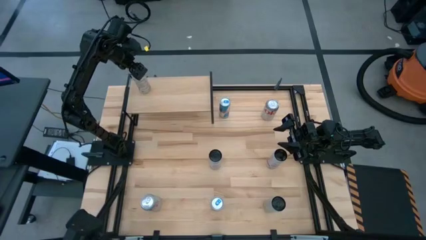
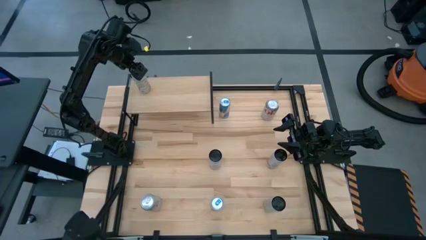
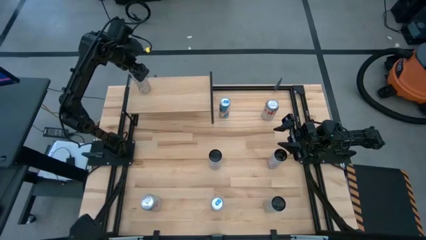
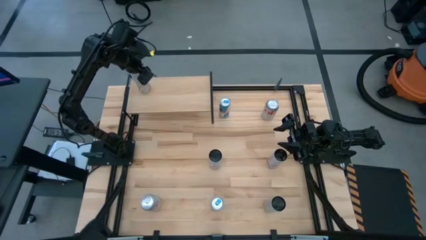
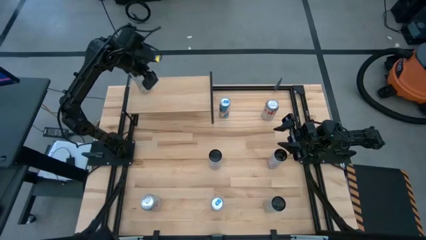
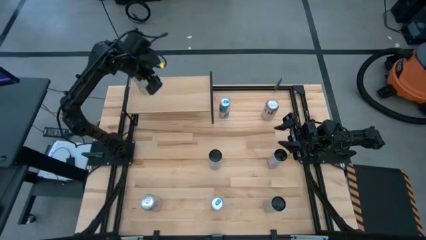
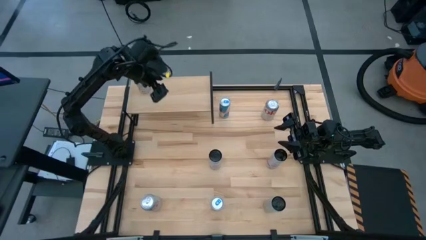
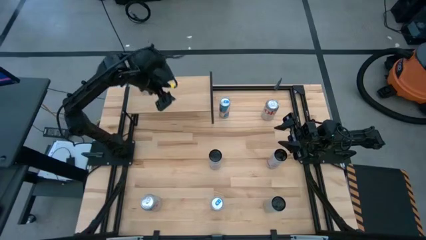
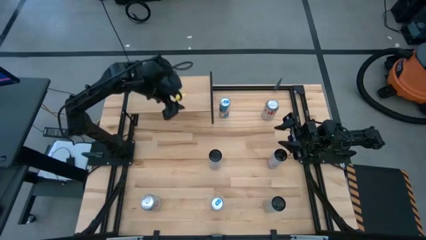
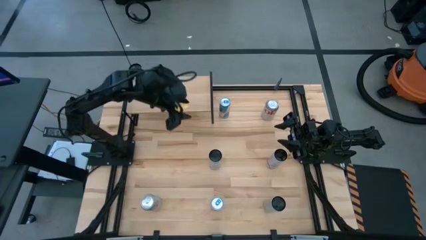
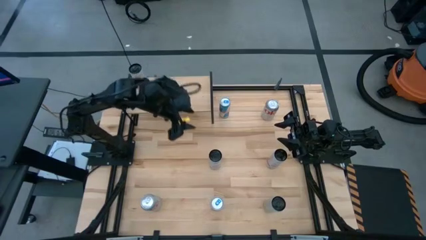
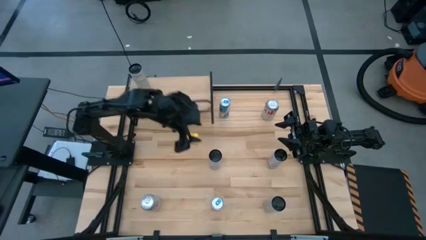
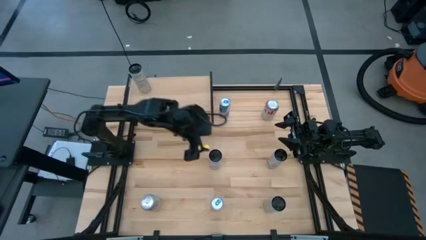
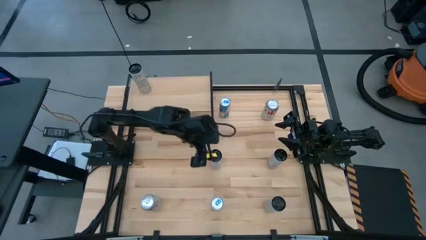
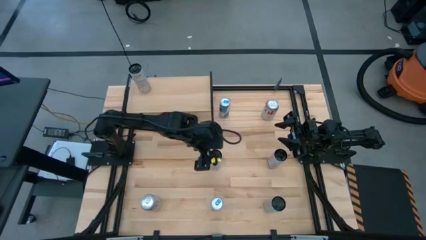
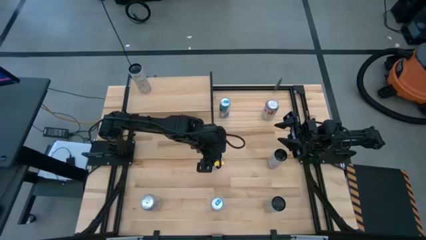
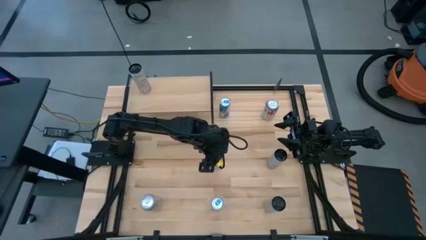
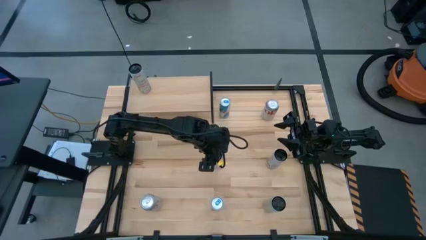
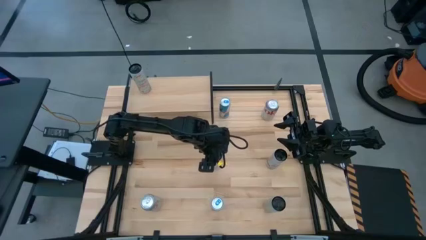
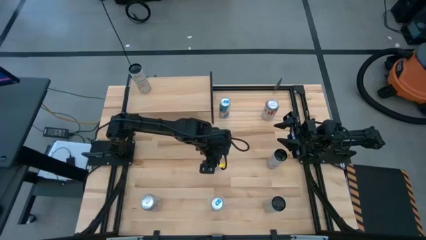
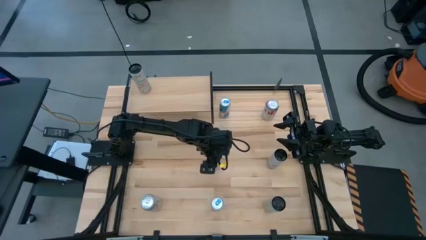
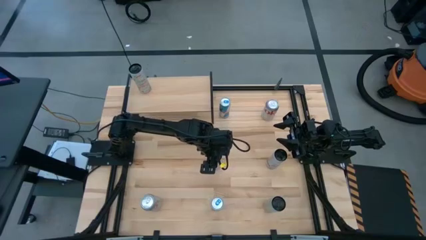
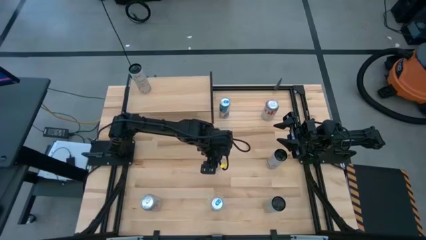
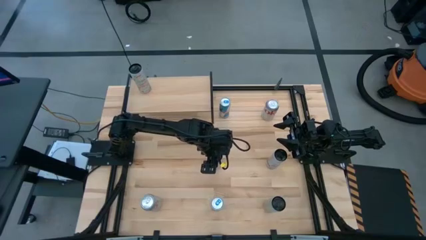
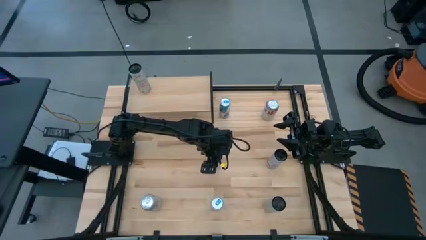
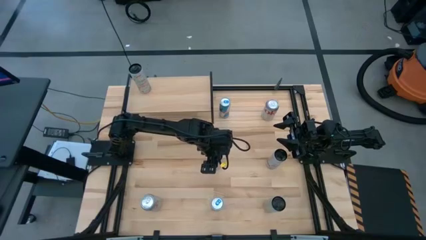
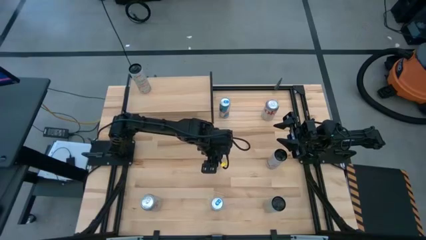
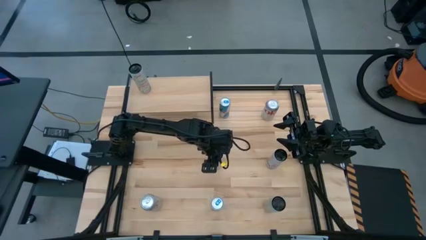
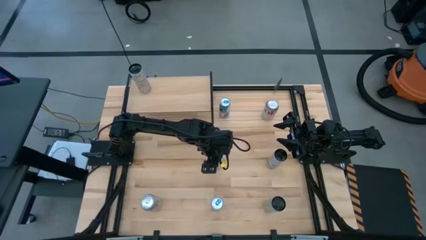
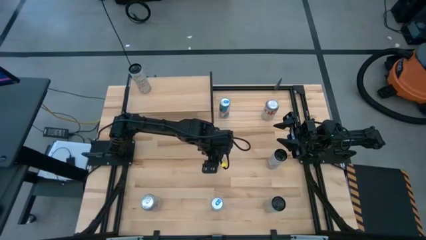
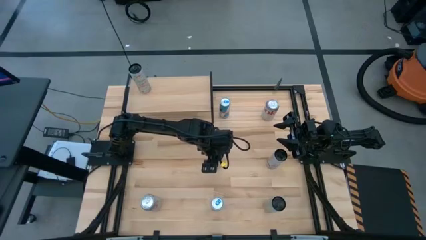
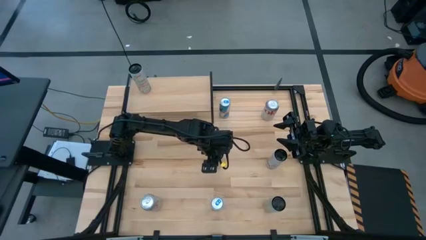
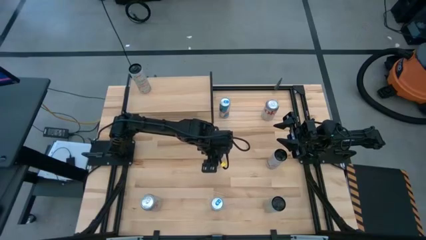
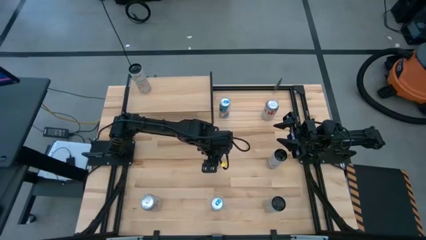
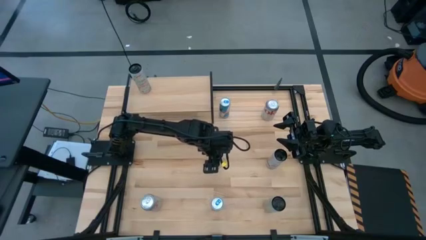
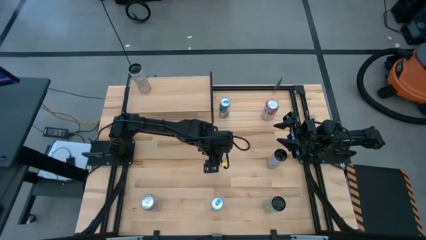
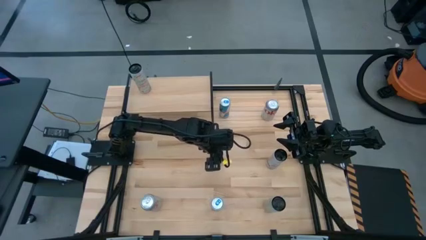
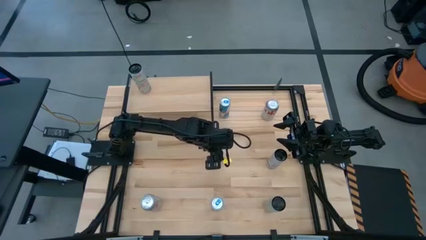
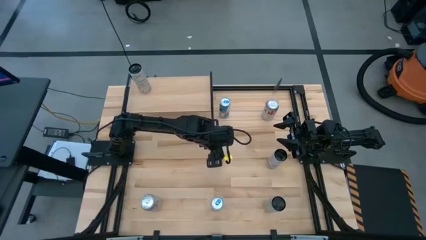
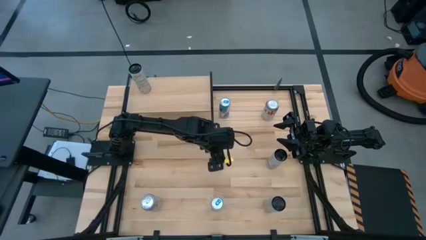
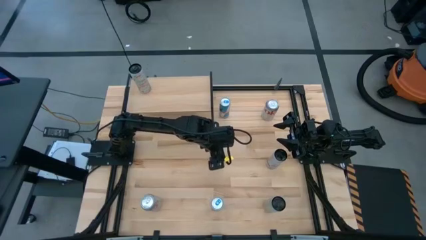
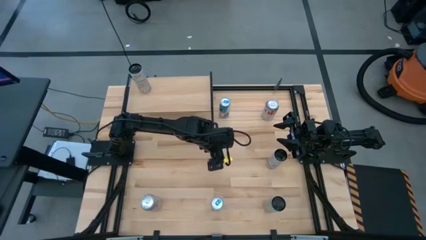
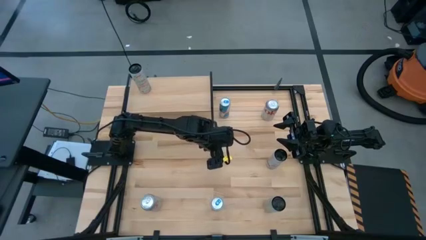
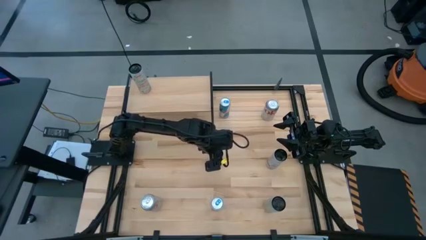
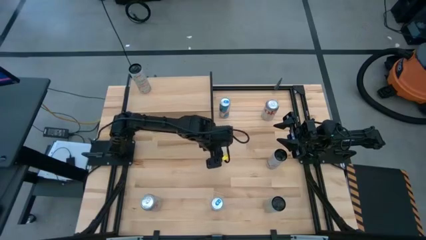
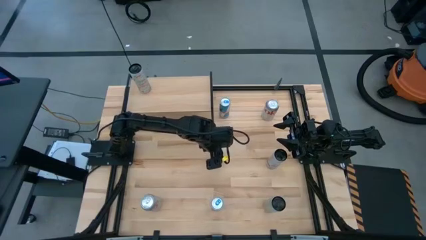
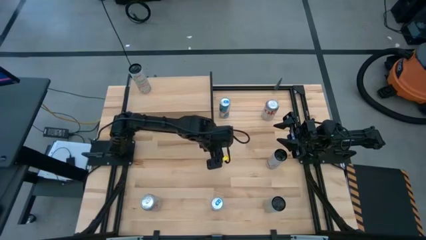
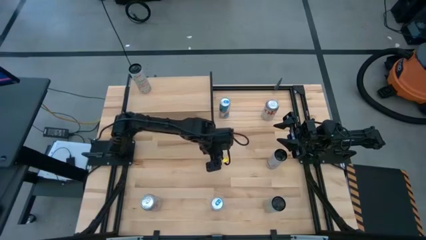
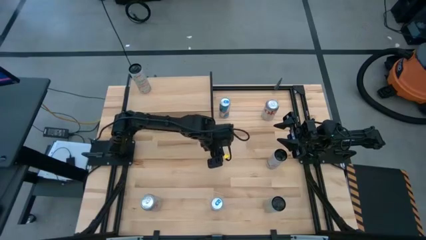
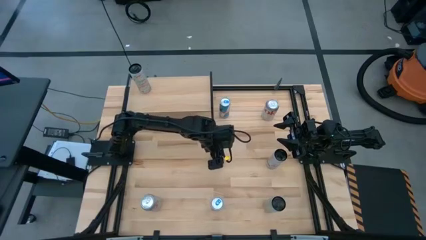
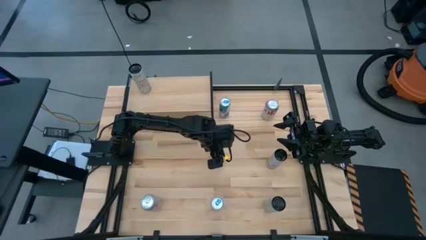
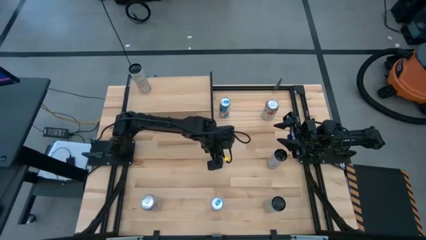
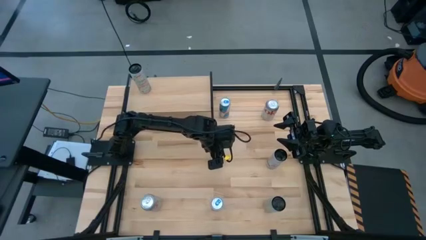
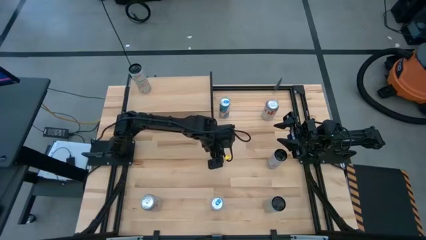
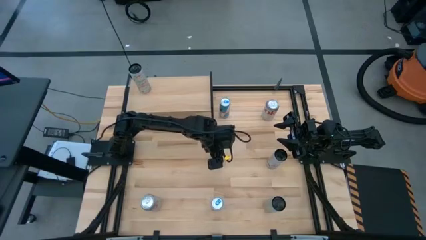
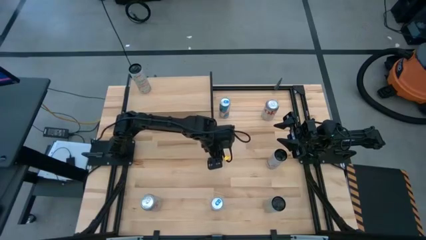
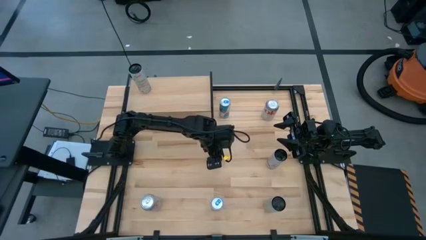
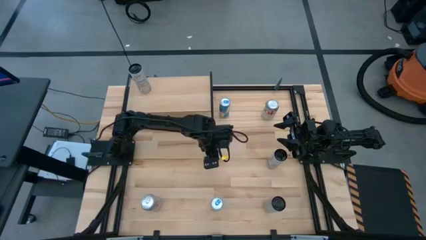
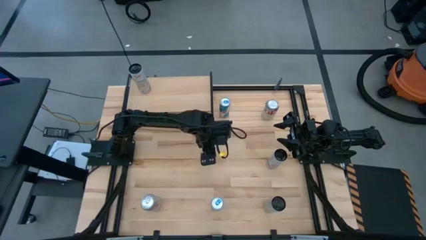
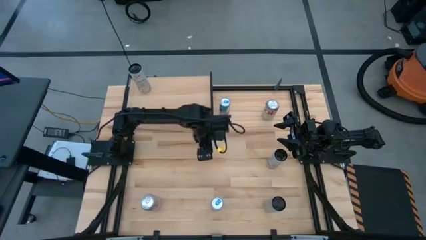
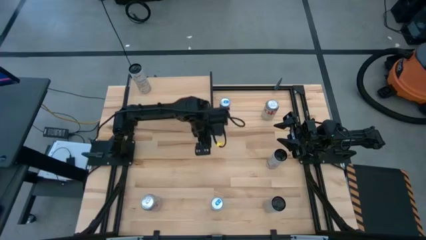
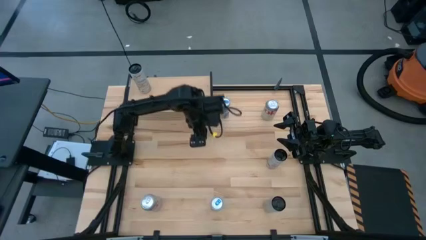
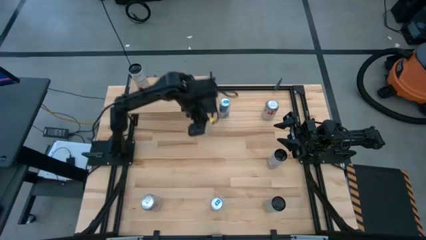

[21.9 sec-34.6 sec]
Task: Place canned beverage on shelf
Put the left white-pink soda can on the shelf
